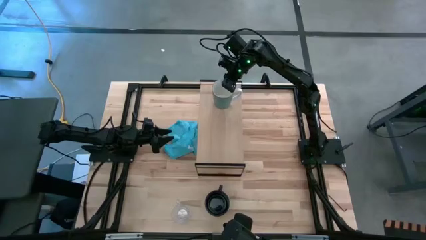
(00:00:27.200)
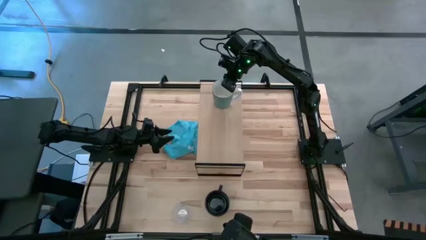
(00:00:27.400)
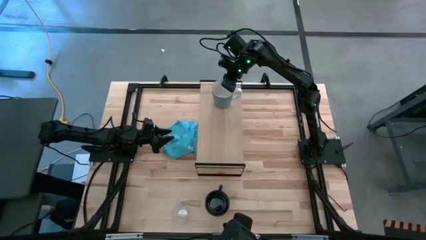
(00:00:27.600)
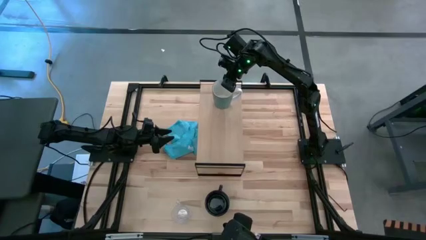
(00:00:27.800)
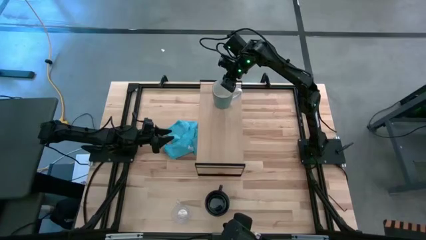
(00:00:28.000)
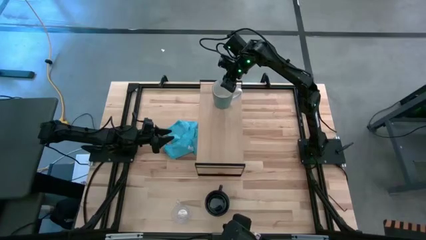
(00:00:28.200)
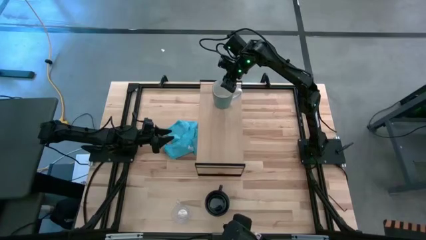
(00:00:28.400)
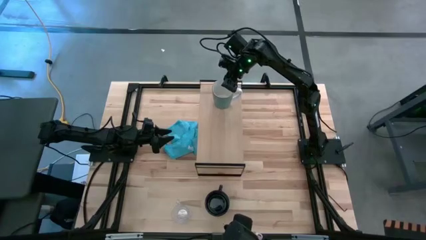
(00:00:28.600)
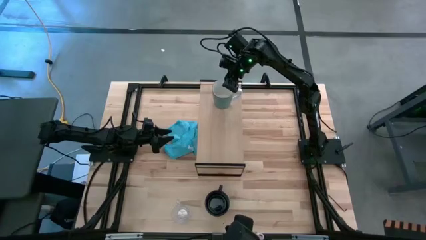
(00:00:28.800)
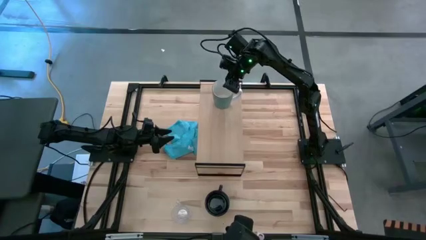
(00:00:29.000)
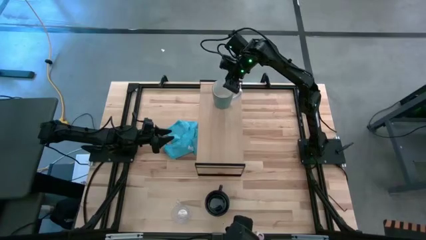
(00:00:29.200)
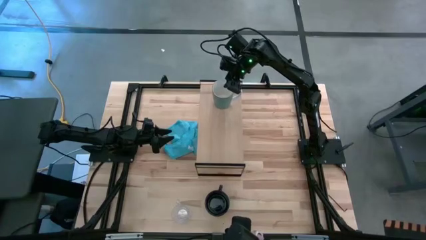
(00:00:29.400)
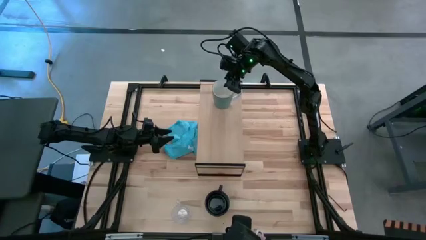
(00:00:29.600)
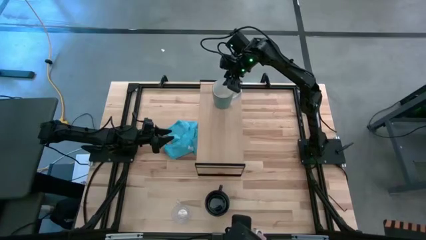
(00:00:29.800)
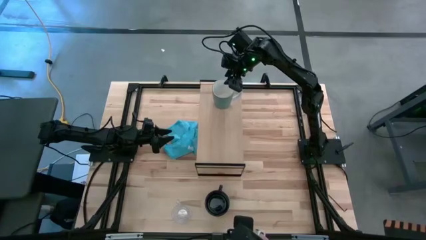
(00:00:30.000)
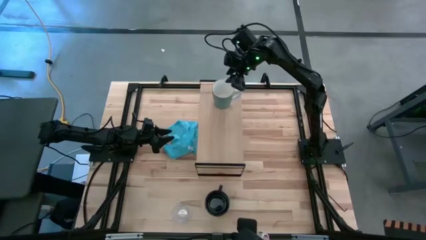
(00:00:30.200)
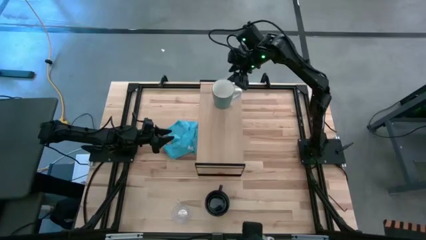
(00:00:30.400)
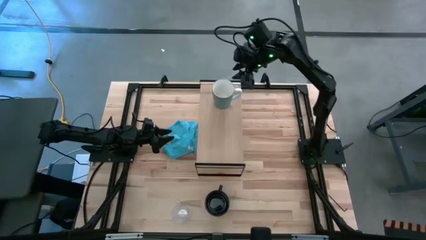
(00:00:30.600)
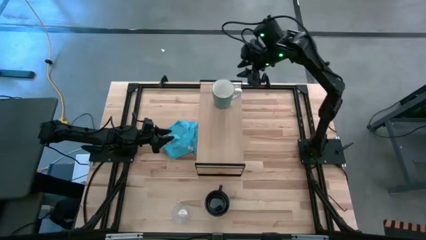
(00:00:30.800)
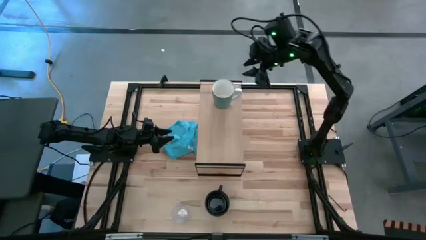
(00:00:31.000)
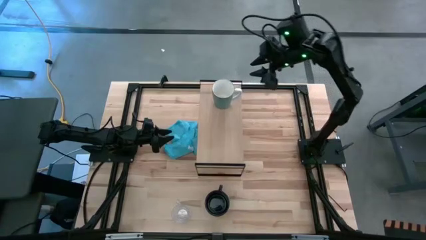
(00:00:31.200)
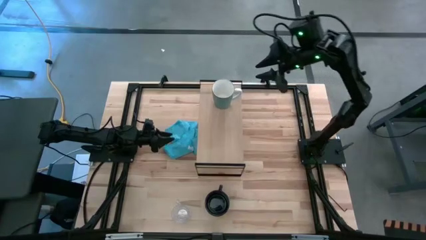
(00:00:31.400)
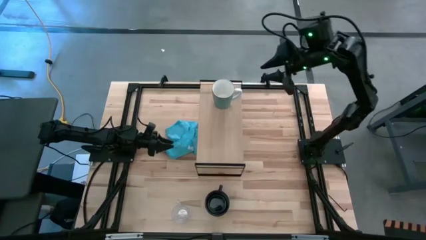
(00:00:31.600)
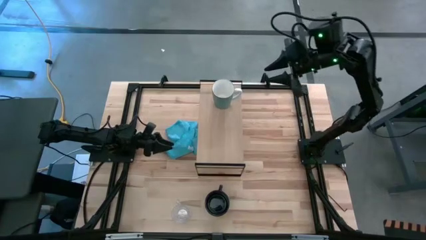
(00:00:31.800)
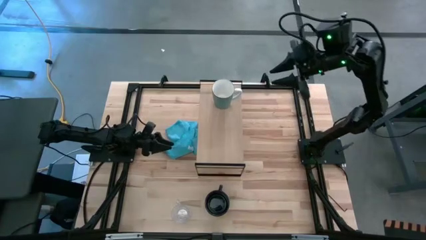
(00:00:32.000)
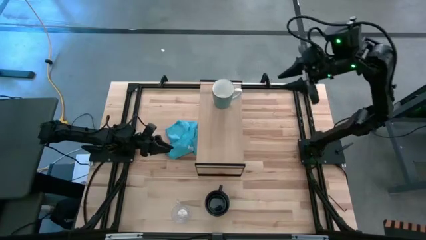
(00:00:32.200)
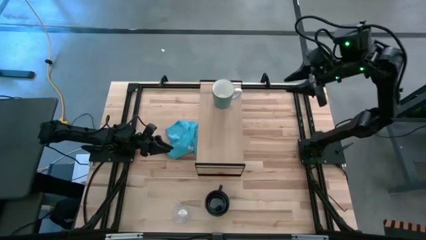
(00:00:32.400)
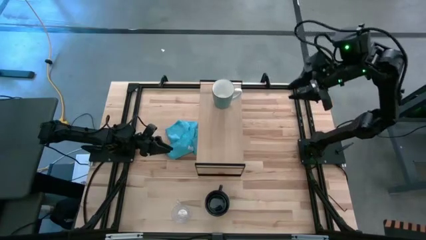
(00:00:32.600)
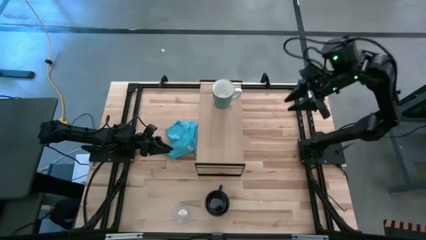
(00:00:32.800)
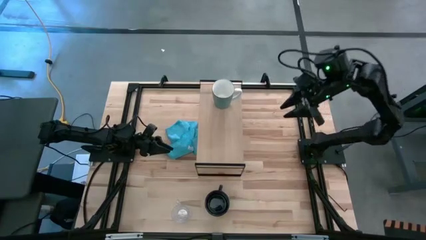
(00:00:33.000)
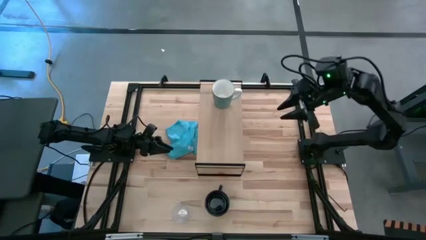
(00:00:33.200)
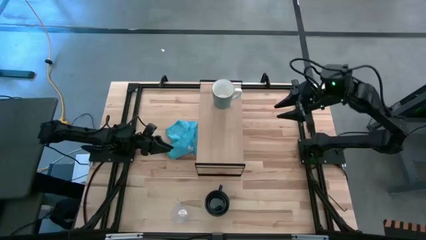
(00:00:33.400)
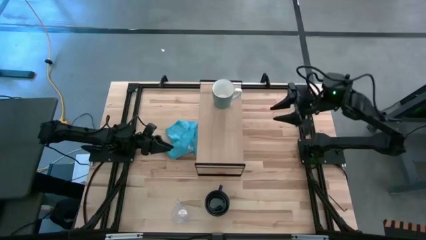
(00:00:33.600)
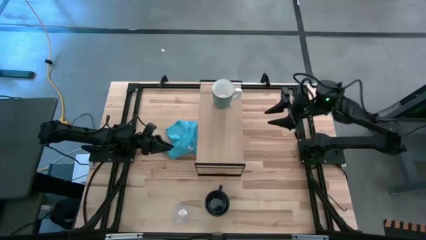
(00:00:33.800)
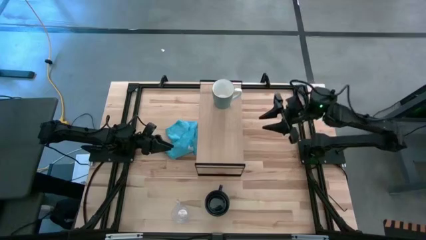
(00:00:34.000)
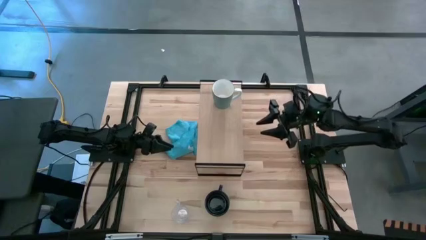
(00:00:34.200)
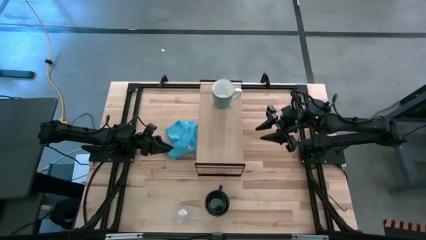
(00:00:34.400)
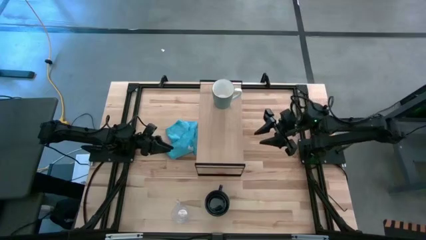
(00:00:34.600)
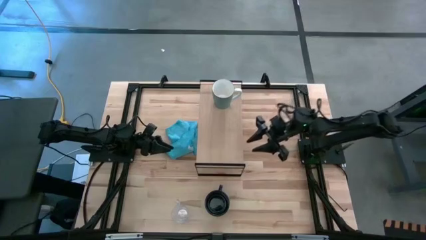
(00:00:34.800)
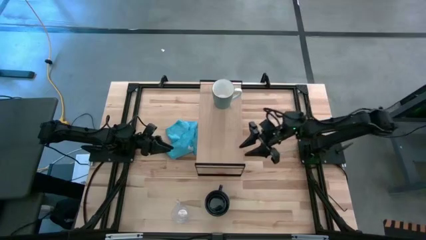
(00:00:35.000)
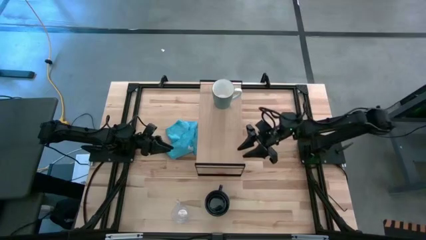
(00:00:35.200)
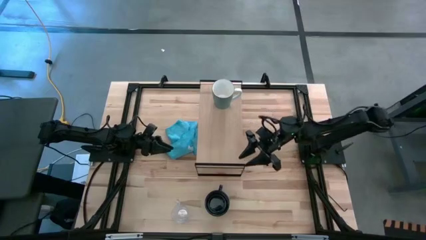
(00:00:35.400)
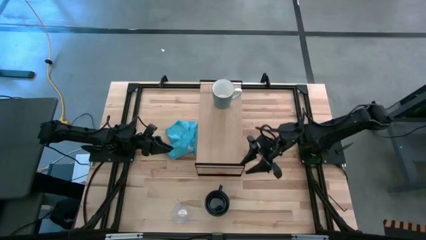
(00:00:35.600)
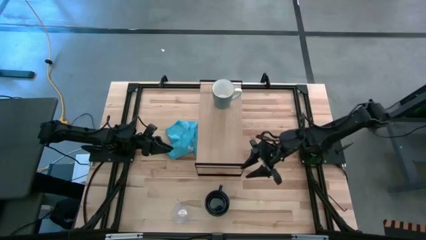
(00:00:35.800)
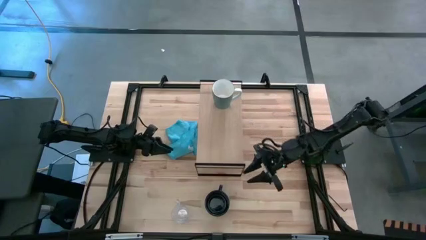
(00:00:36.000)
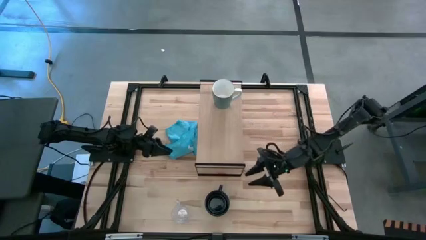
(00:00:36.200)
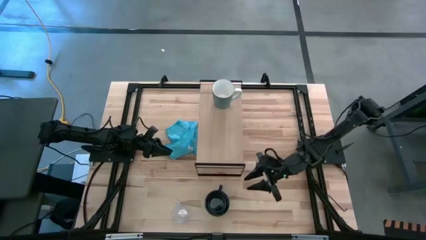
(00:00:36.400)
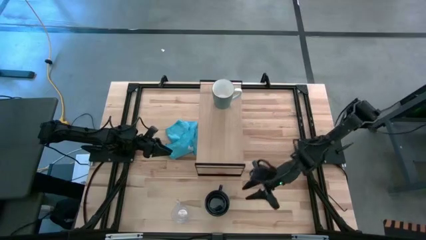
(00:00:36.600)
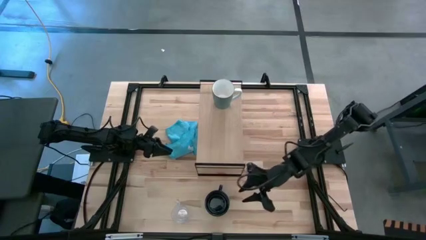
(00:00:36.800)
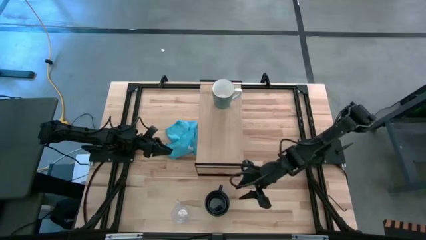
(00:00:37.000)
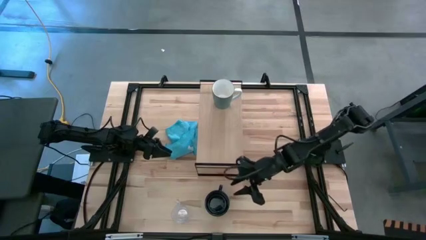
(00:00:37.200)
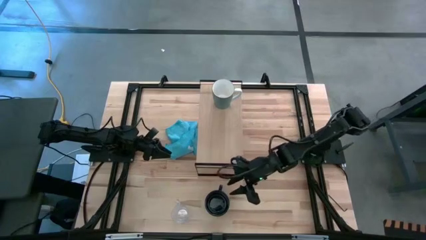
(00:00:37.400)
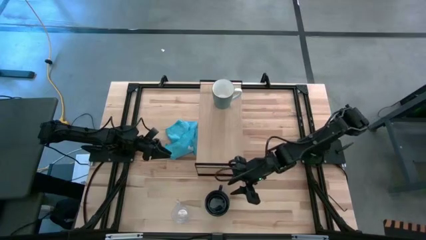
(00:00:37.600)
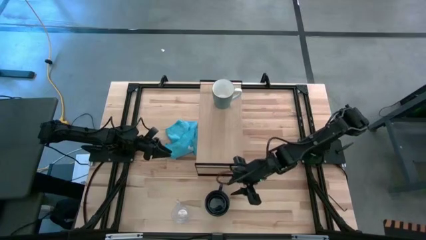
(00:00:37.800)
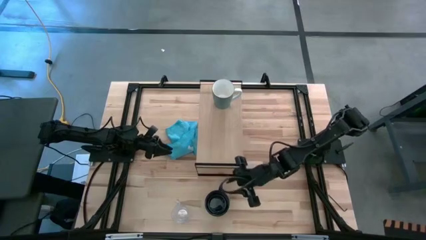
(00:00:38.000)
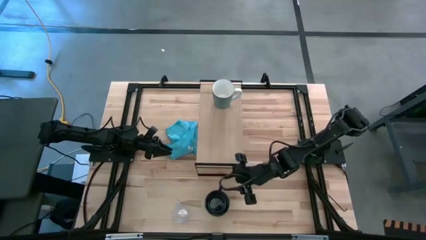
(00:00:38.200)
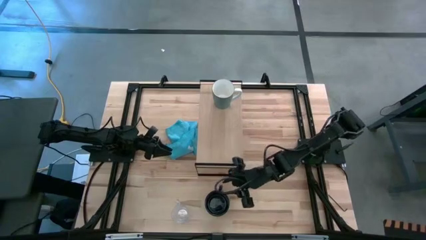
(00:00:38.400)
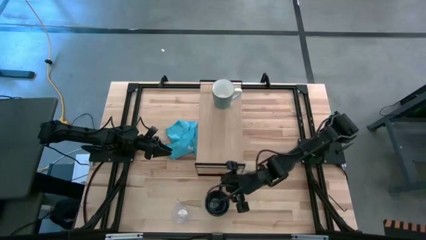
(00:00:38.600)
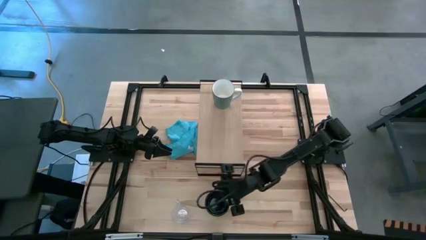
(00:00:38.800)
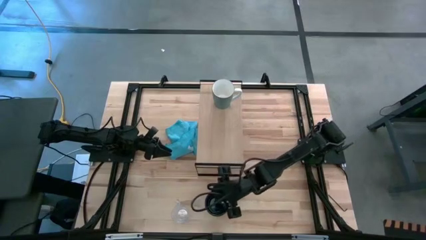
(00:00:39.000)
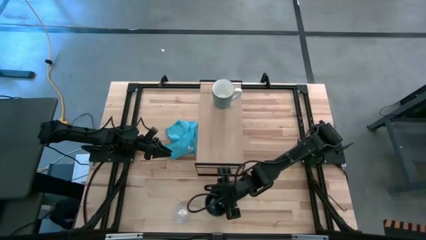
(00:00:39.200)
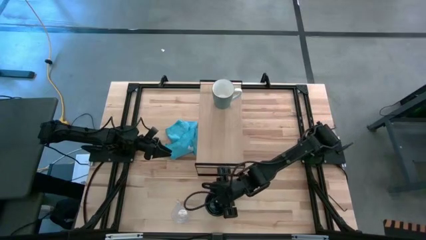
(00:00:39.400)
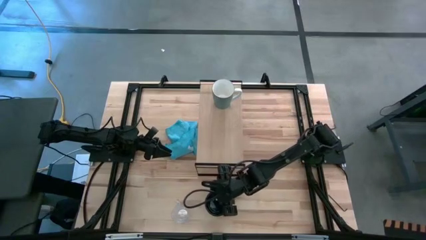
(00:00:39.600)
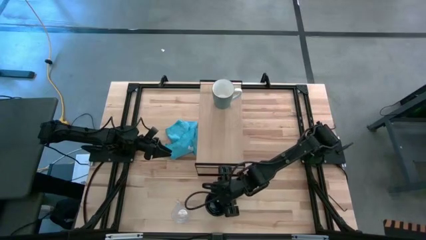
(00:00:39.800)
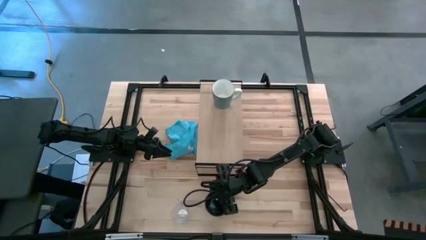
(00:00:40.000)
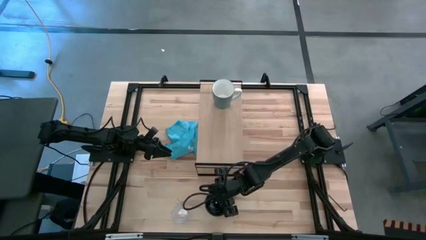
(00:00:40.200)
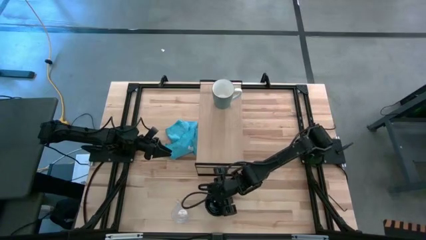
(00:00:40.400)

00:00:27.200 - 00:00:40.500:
Task: Stack small to large cups/mugs on shelf
Put the black mug on the shelf
